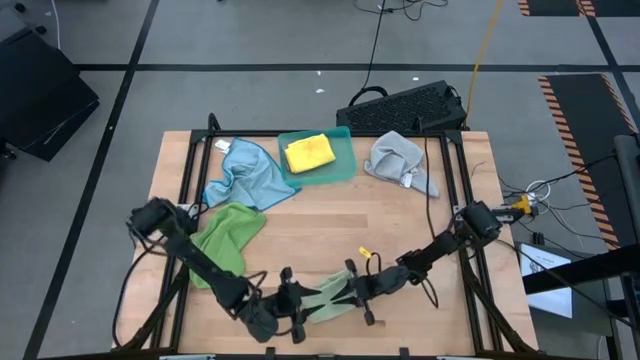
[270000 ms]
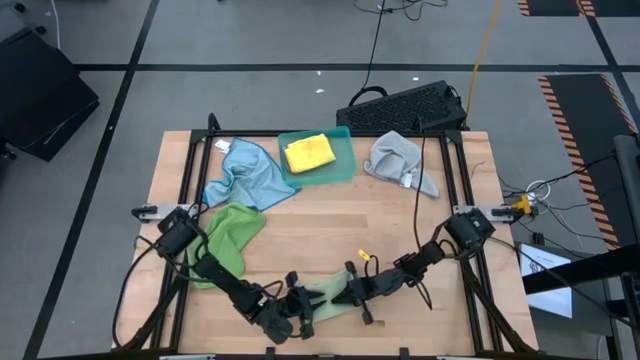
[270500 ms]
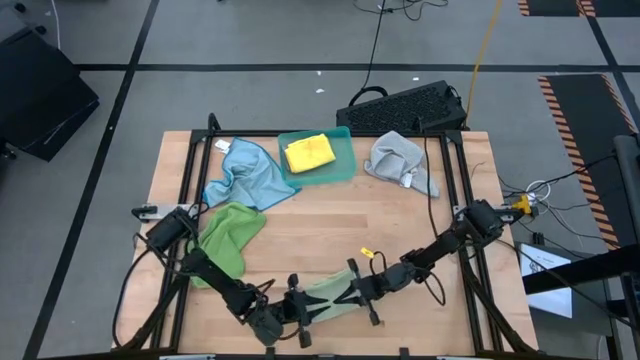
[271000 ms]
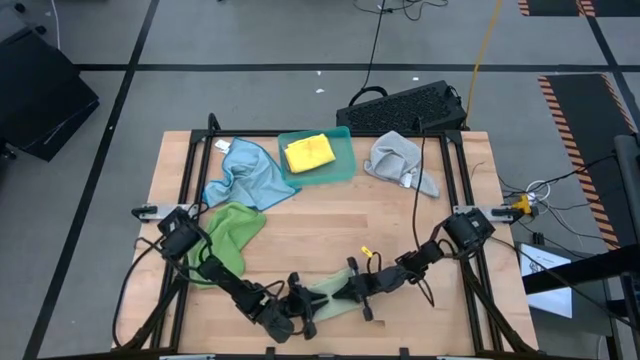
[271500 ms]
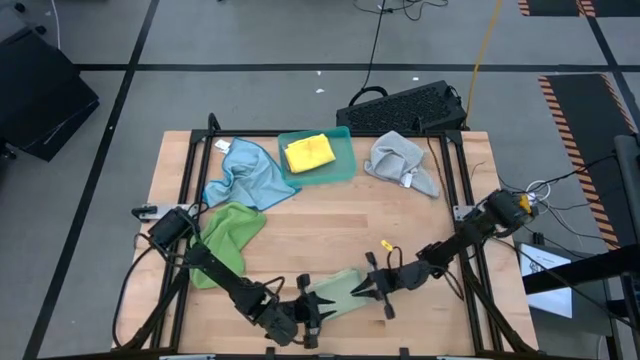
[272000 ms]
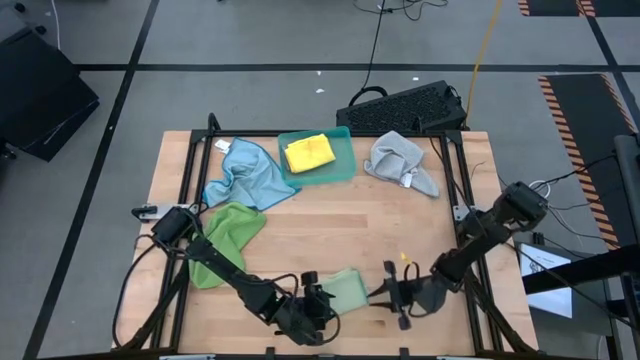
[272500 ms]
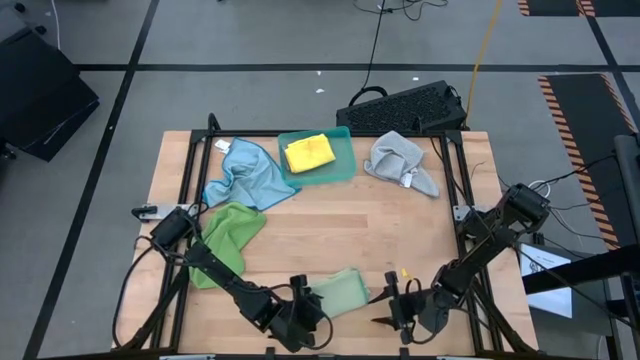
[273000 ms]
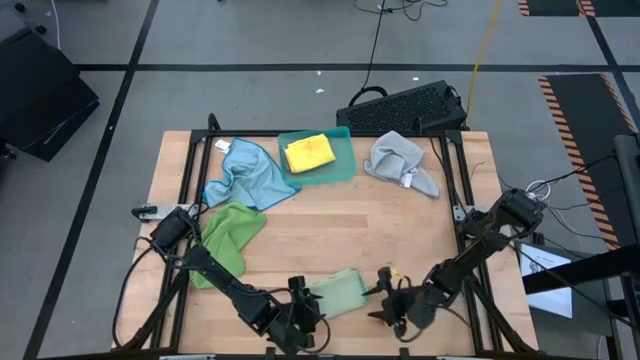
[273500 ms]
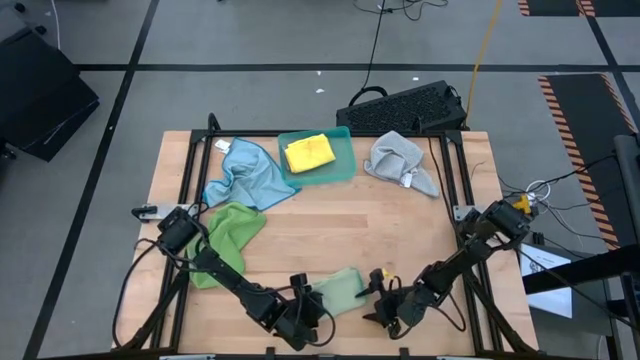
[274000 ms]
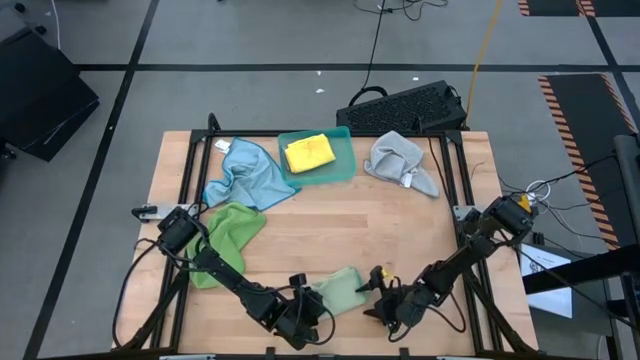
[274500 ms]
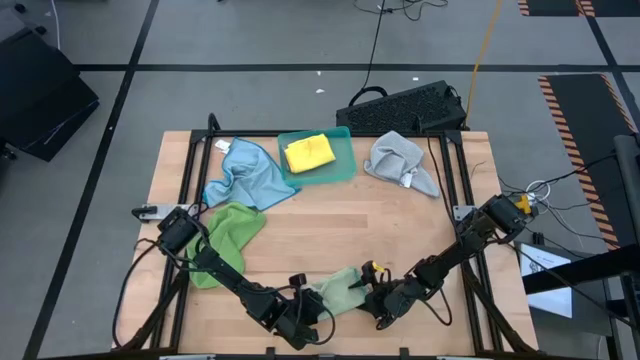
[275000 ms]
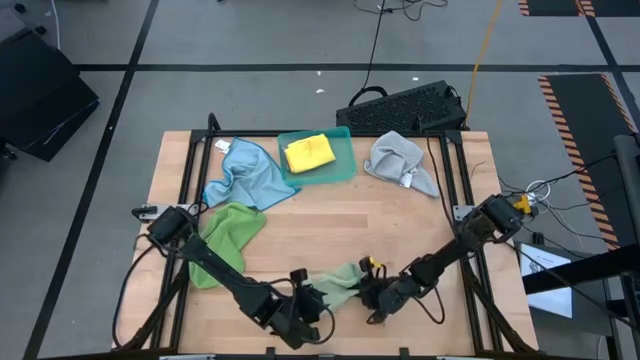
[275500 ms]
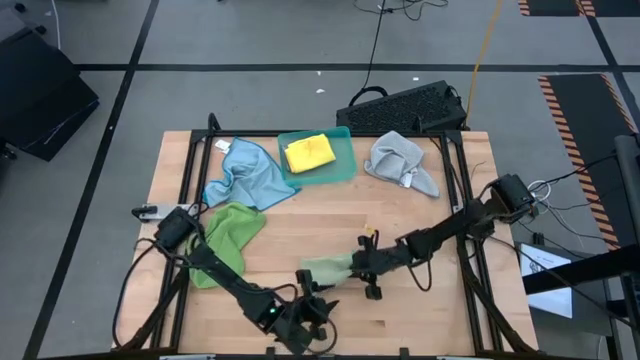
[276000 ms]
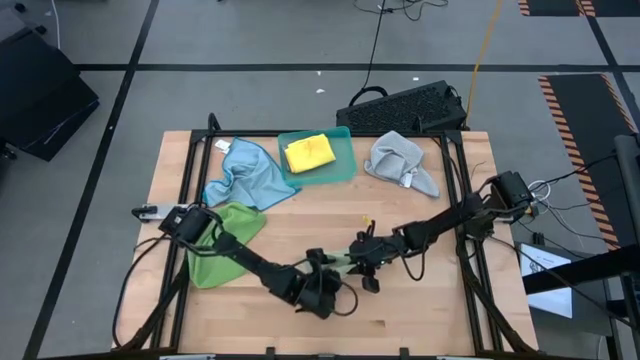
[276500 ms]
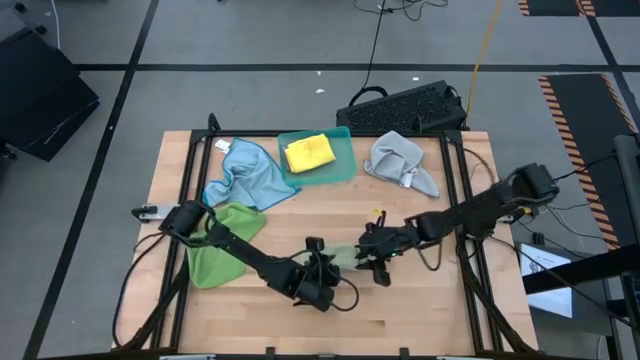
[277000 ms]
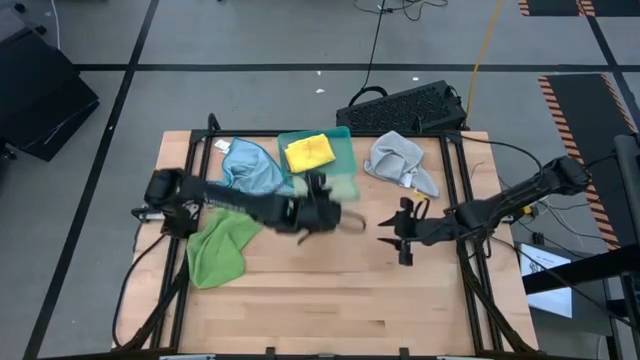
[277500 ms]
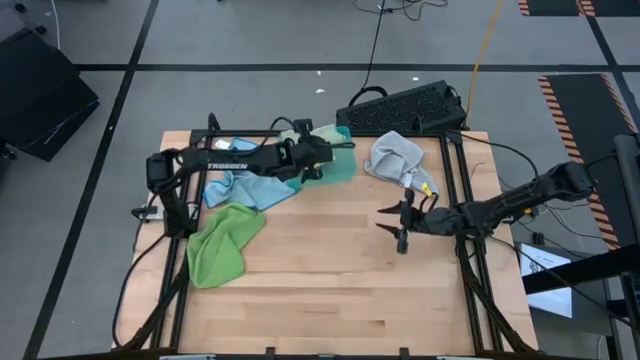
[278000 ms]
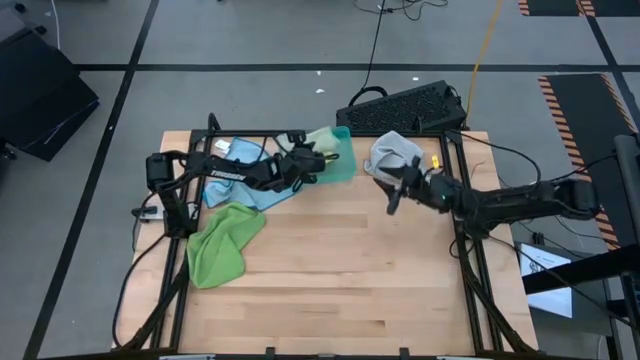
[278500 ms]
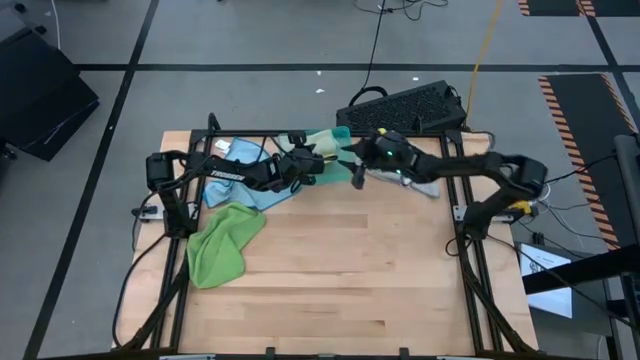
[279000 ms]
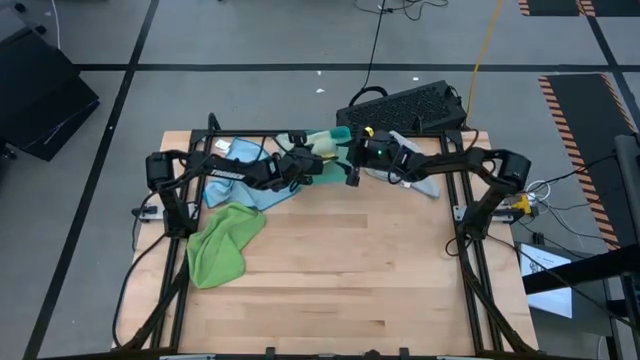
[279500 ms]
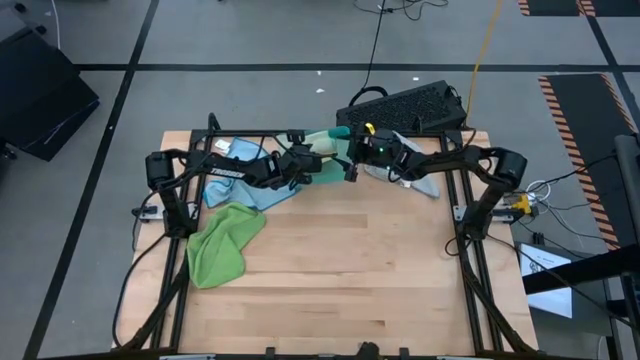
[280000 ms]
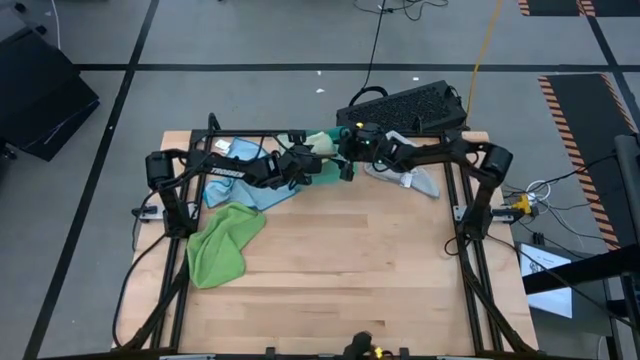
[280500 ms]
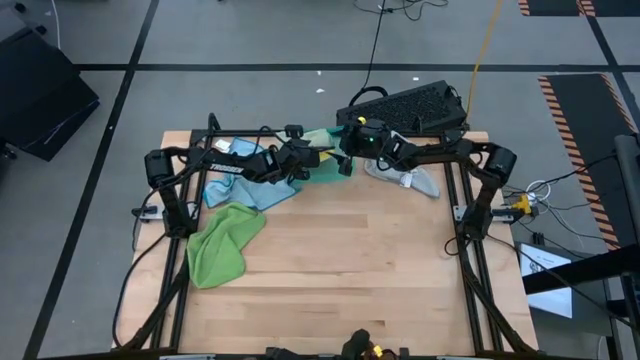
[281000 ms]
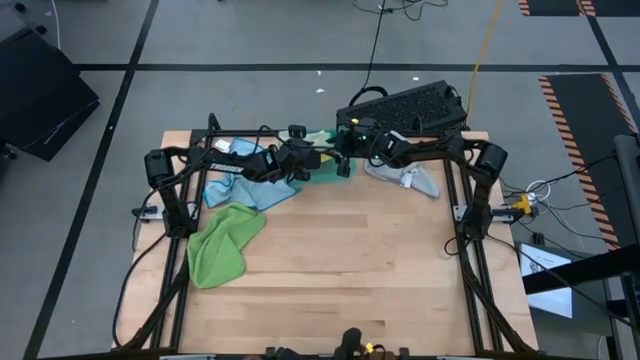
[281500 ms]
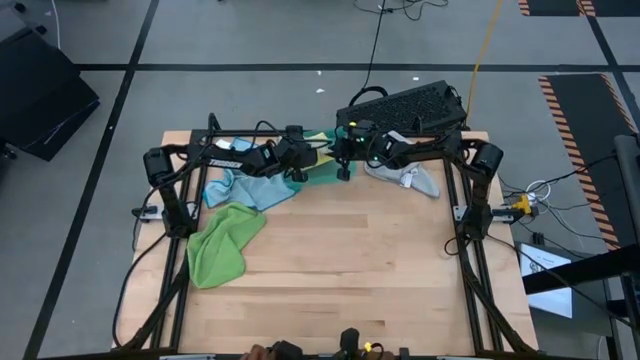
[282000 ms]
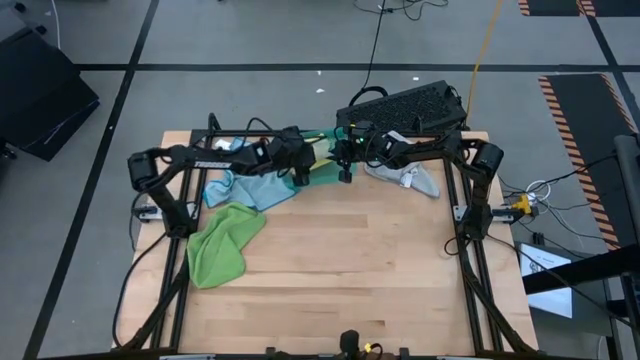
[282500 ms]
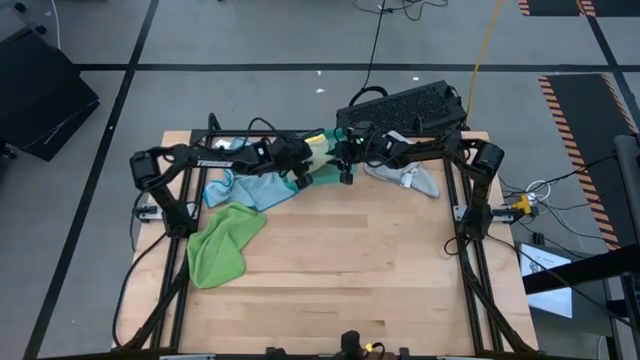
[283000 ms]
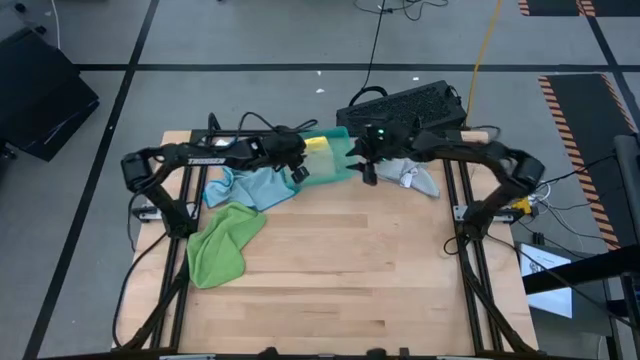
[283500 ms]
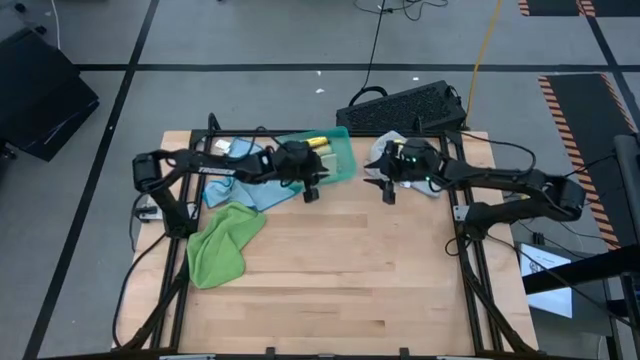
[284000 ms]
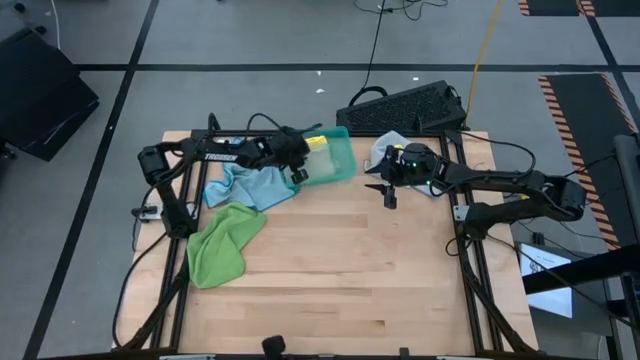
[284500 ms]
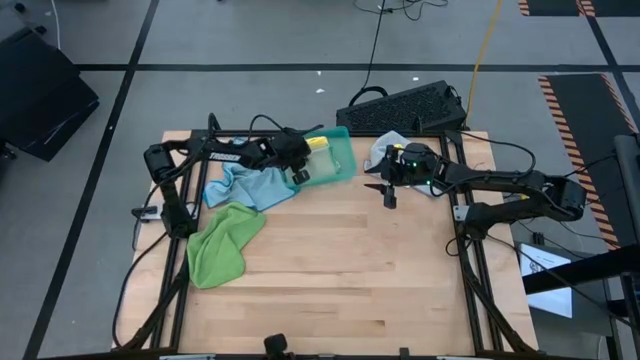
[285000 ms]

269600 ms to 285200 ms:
Task: Fold microfiber towels
Stack the folded light green microfiber cloth on top of the folded yellow microfiber cloth into the green bin

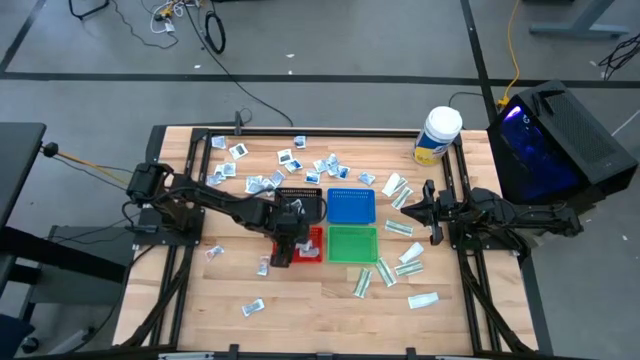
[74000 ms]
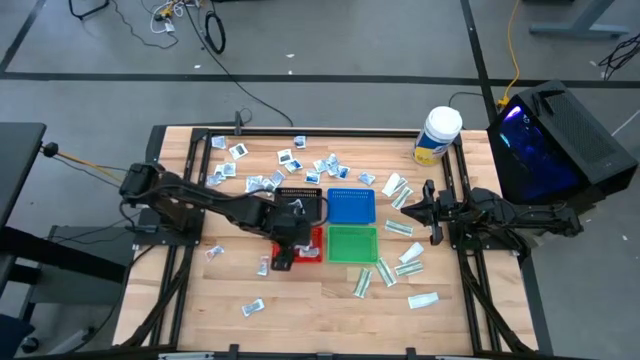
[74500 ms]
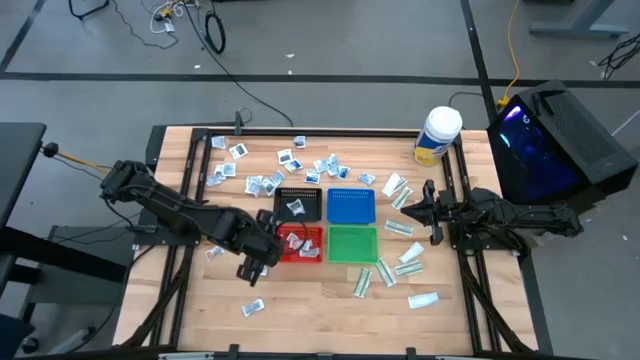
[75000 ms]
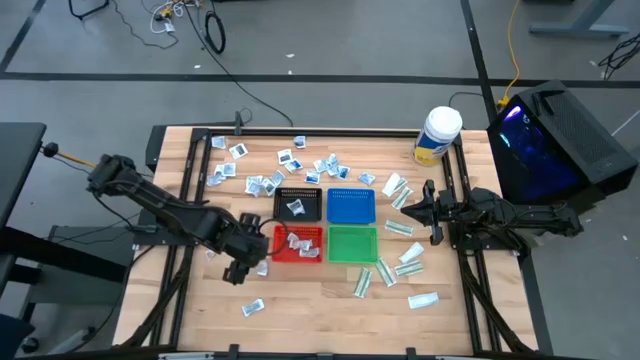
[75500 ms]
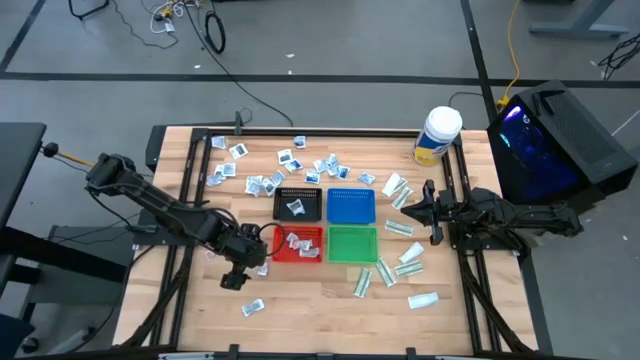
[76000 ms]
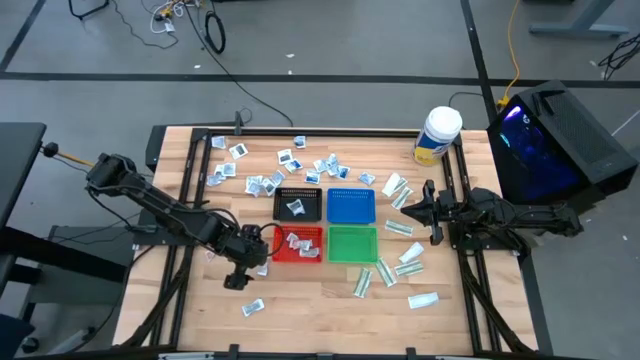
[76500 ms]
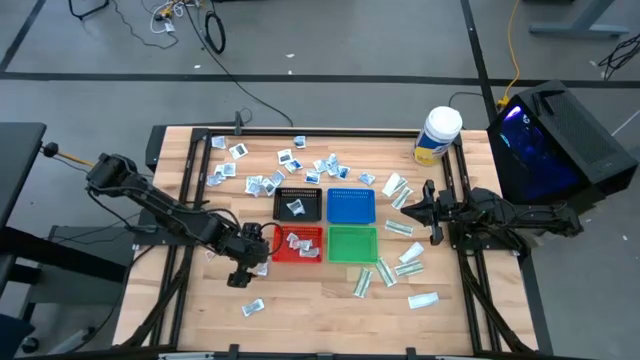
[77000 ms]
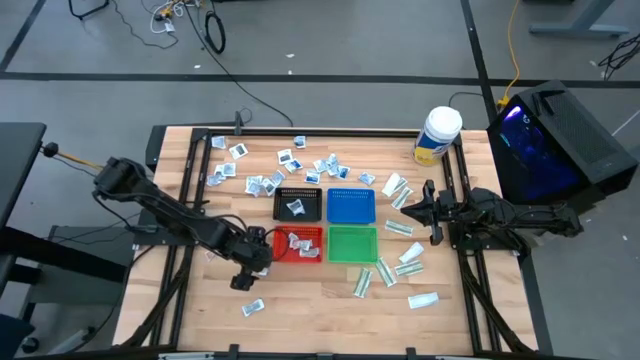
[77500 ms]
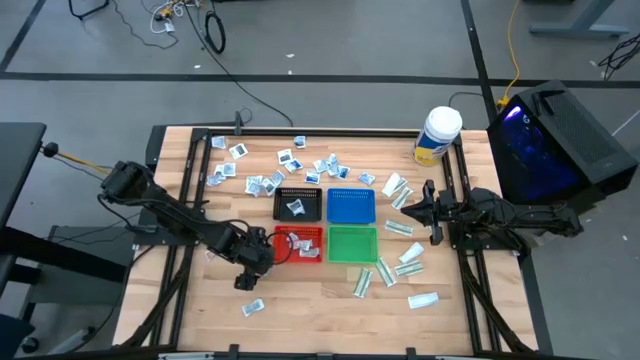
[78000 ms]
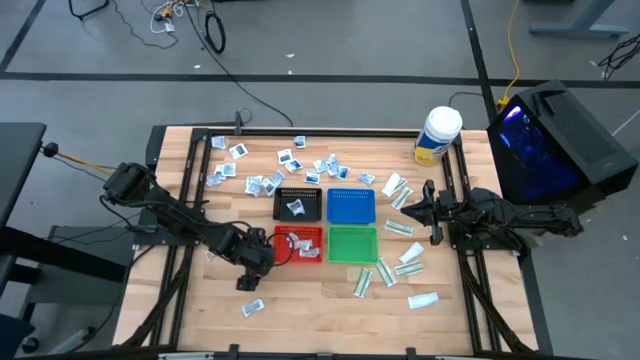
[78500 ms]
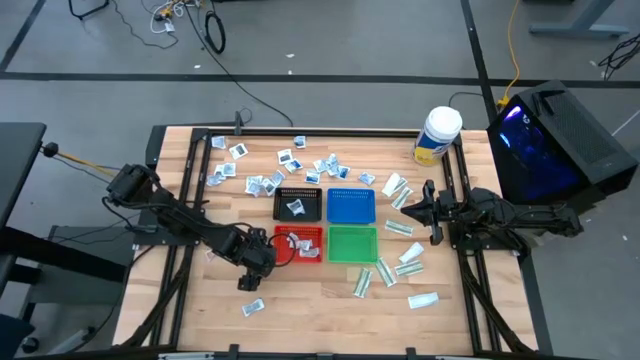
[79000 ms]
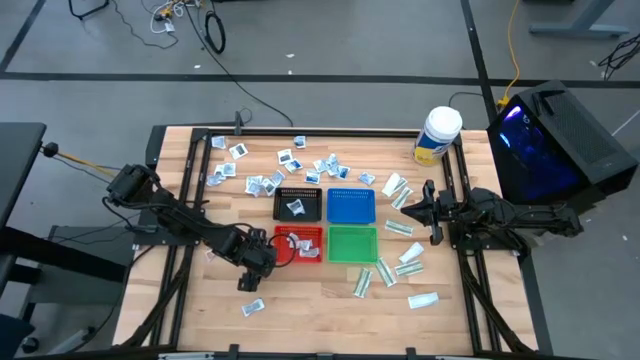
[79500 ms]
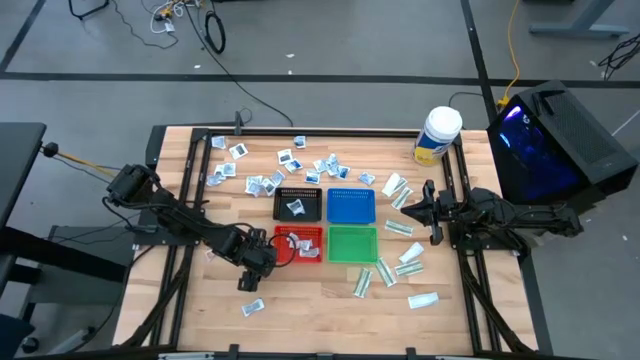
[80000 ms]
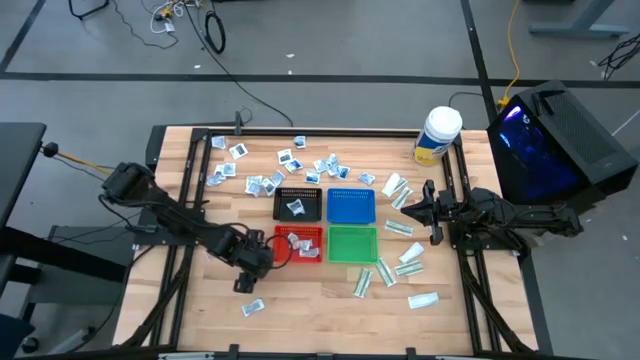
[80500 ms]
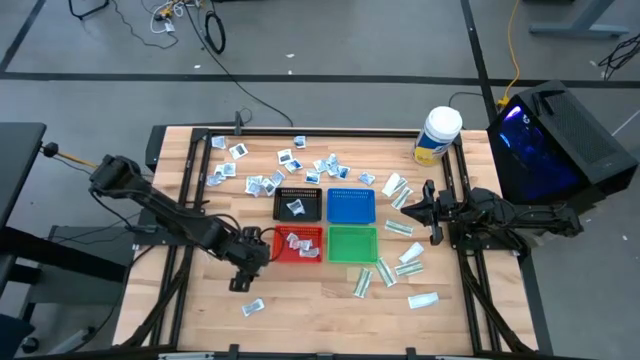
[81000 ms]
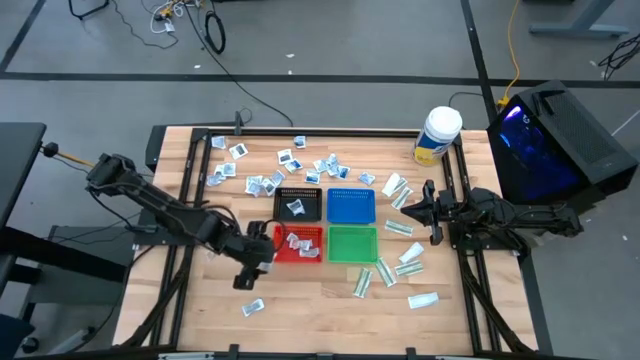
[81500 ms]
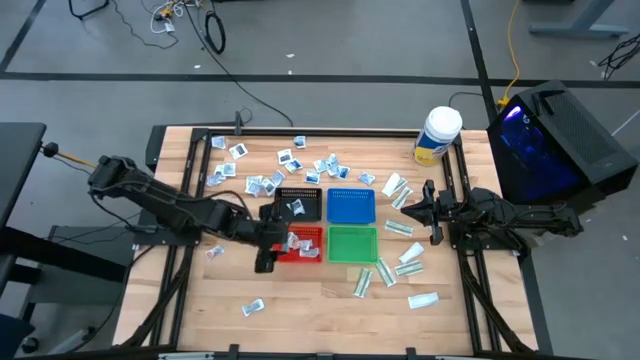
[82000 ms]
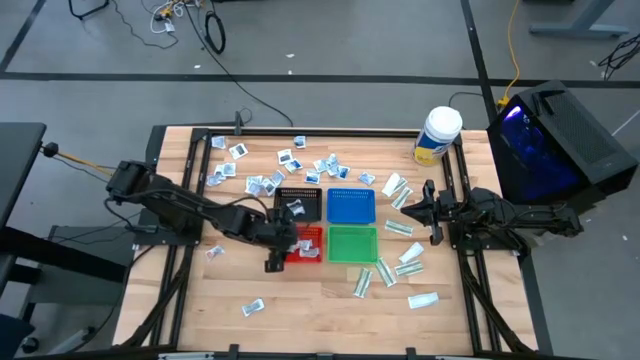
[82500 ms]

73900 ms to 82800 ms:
Task: Pick & Place First Aid Supplies
Put the orange ointment pack into the orange bin
